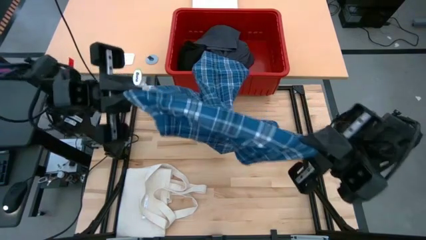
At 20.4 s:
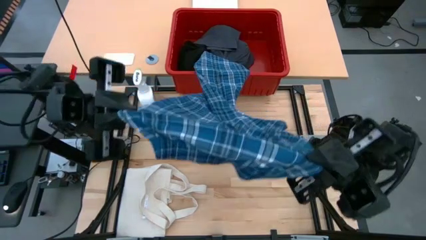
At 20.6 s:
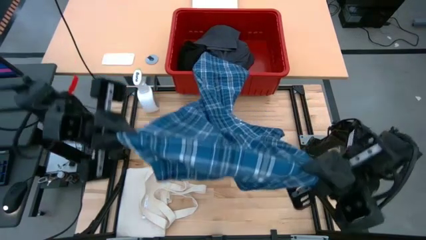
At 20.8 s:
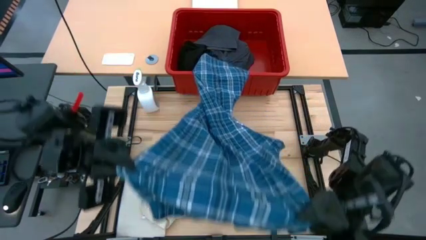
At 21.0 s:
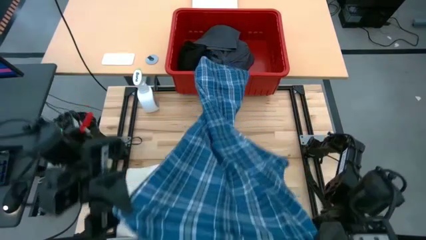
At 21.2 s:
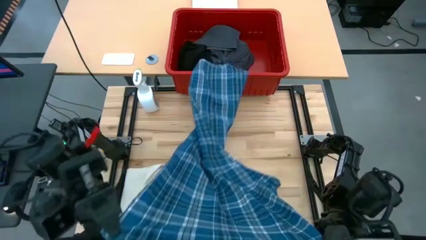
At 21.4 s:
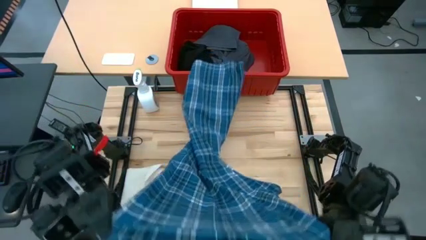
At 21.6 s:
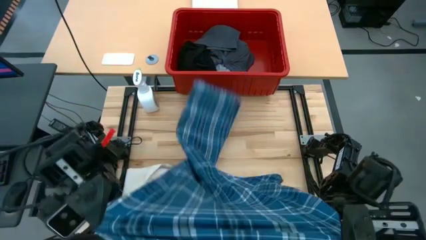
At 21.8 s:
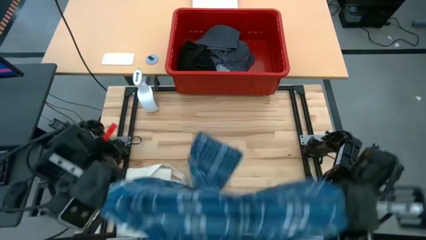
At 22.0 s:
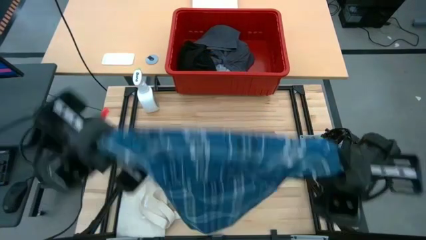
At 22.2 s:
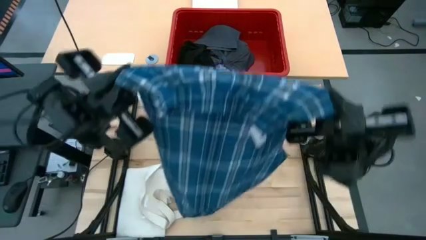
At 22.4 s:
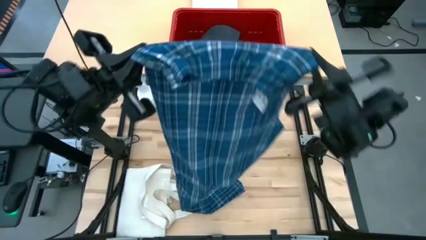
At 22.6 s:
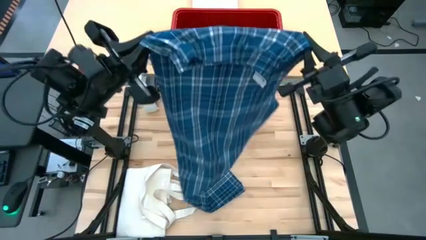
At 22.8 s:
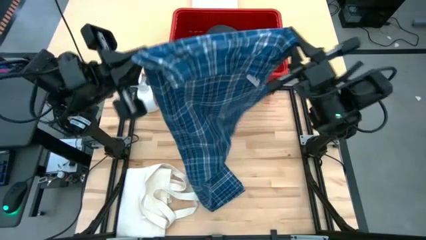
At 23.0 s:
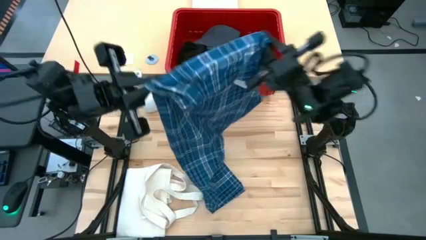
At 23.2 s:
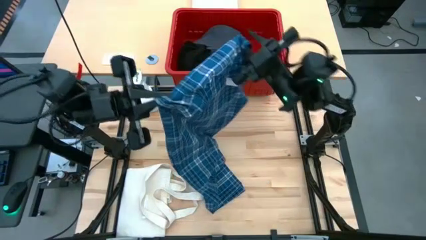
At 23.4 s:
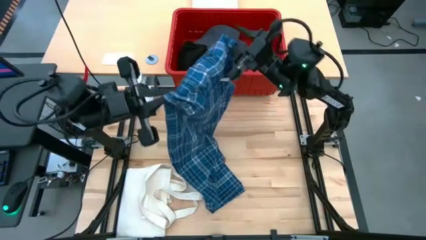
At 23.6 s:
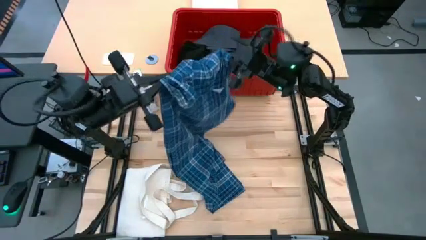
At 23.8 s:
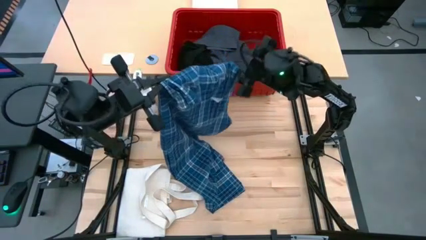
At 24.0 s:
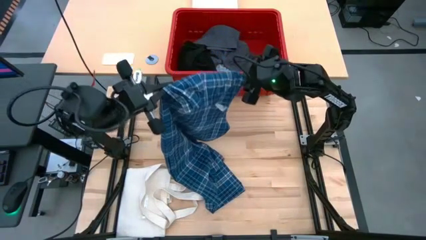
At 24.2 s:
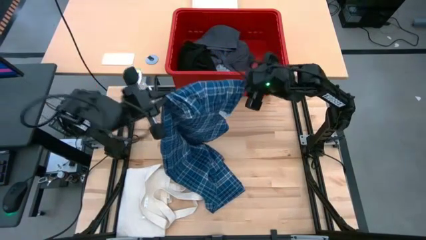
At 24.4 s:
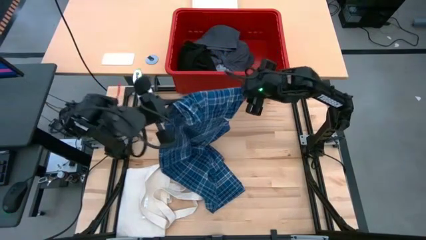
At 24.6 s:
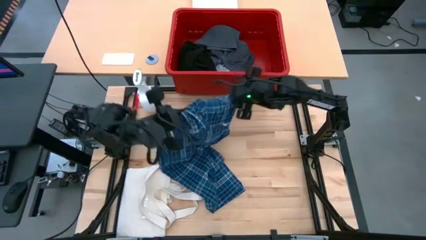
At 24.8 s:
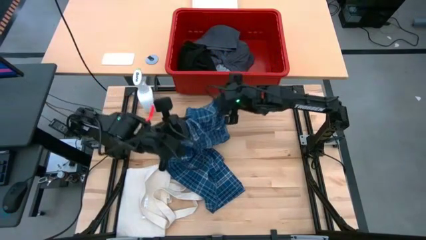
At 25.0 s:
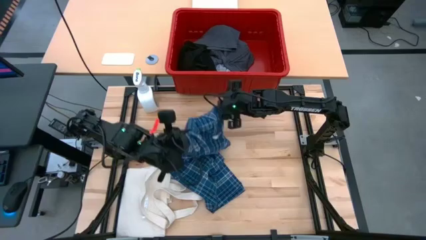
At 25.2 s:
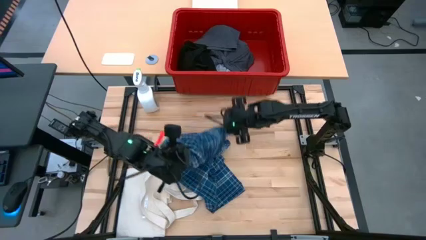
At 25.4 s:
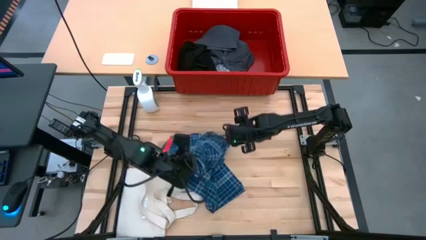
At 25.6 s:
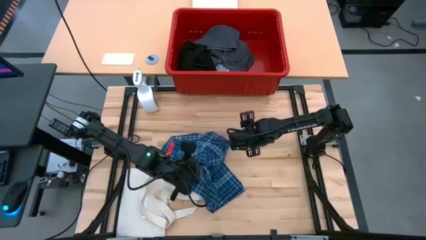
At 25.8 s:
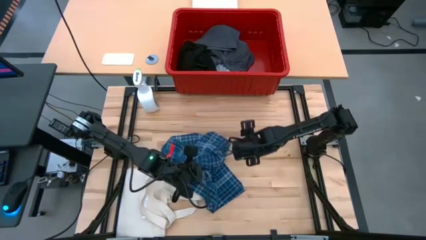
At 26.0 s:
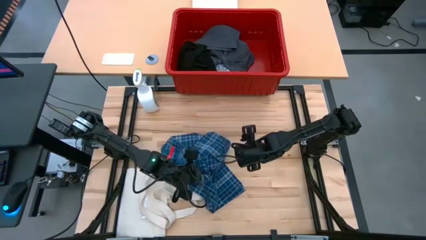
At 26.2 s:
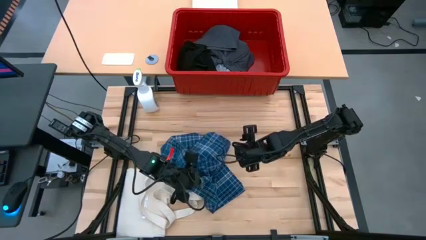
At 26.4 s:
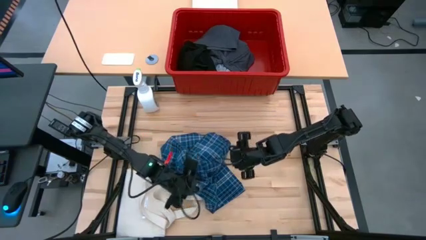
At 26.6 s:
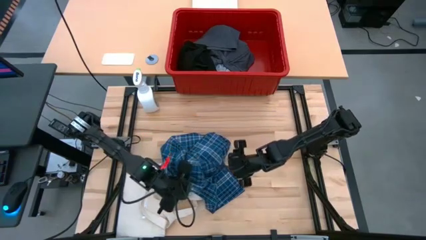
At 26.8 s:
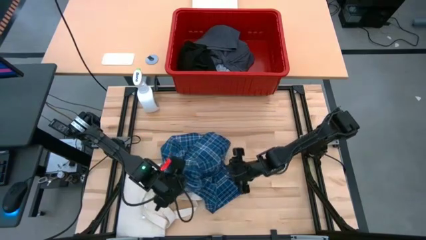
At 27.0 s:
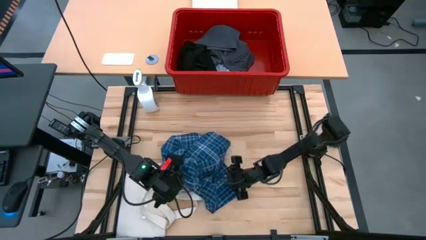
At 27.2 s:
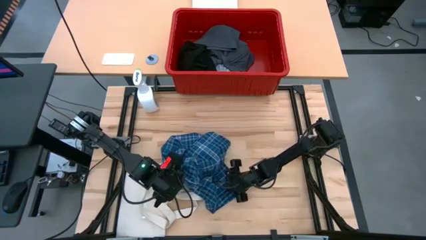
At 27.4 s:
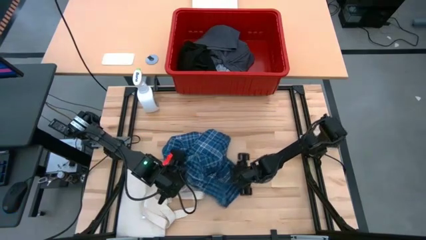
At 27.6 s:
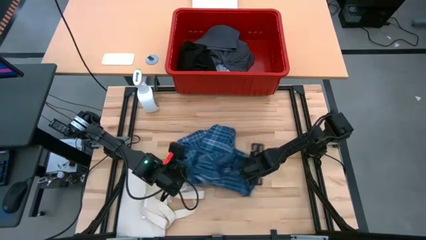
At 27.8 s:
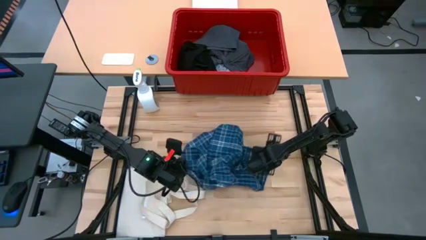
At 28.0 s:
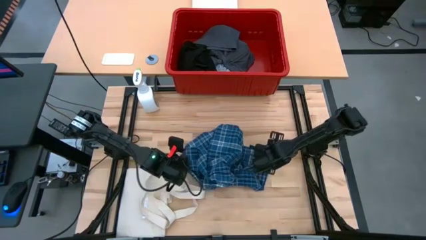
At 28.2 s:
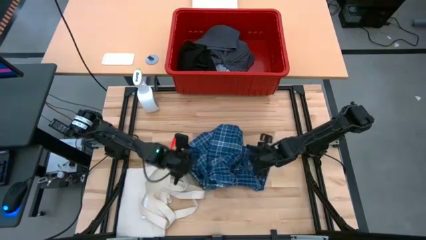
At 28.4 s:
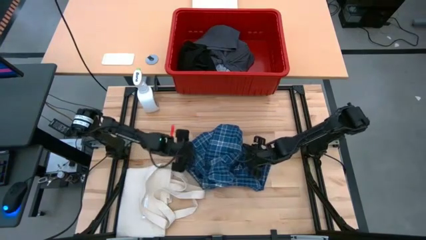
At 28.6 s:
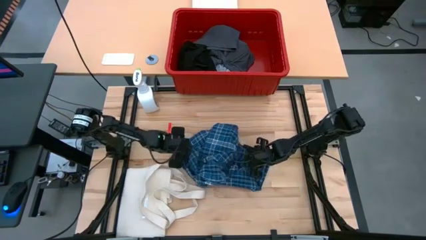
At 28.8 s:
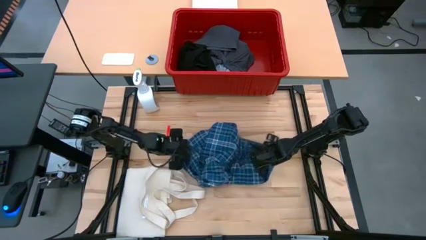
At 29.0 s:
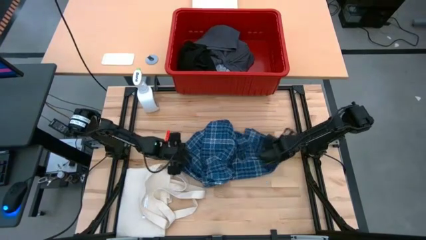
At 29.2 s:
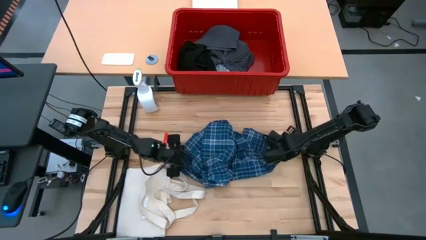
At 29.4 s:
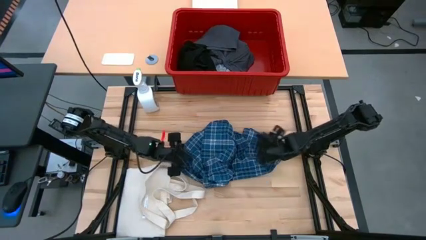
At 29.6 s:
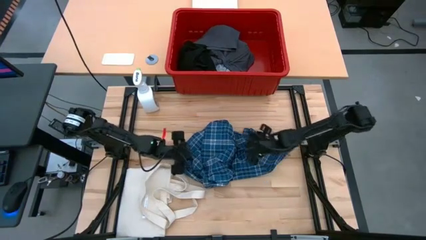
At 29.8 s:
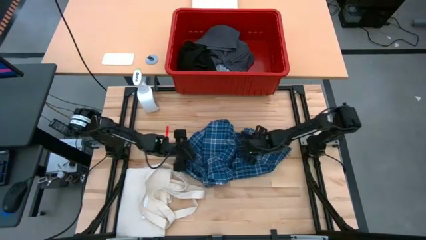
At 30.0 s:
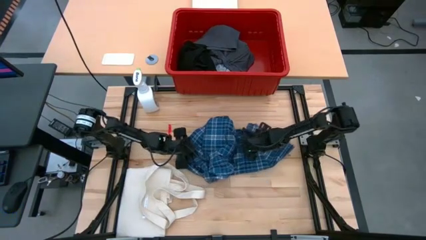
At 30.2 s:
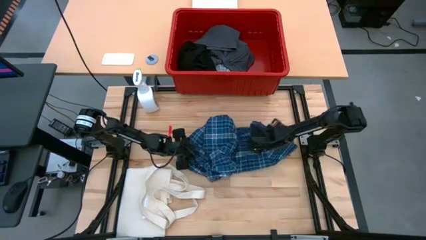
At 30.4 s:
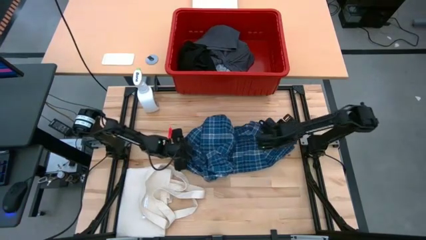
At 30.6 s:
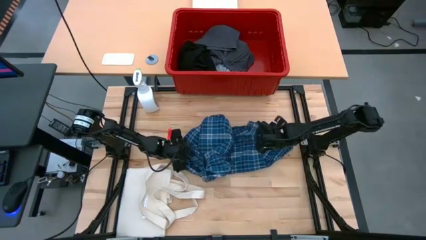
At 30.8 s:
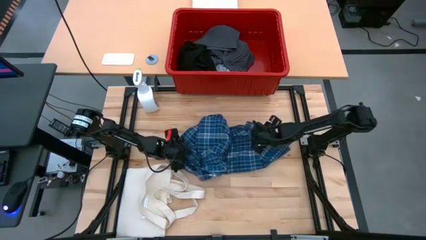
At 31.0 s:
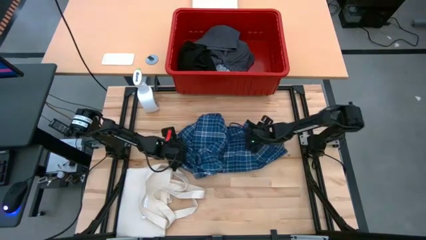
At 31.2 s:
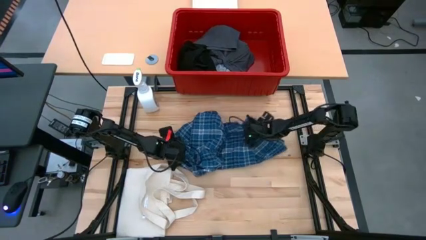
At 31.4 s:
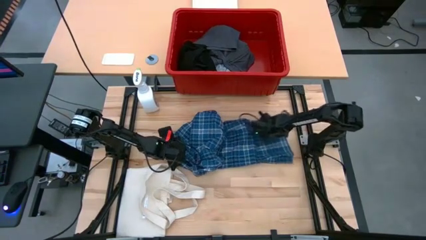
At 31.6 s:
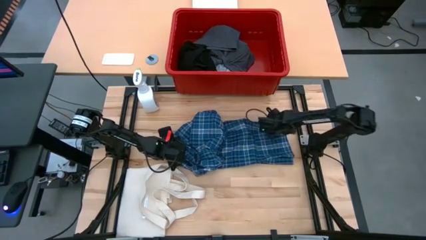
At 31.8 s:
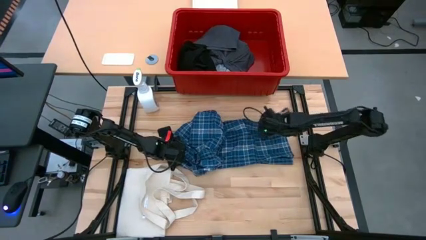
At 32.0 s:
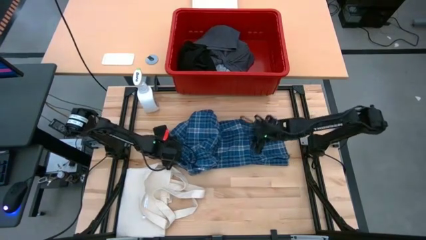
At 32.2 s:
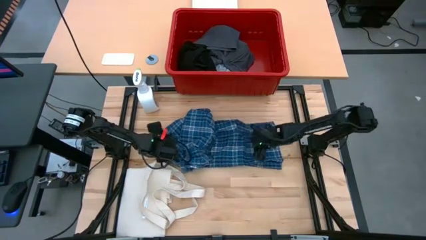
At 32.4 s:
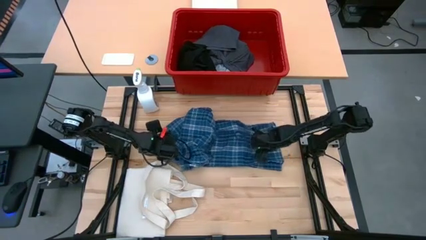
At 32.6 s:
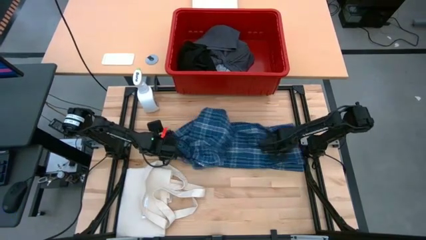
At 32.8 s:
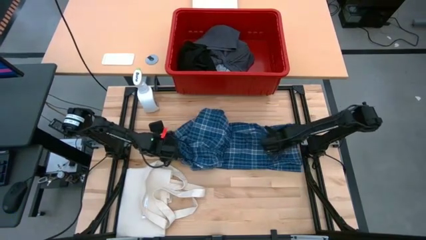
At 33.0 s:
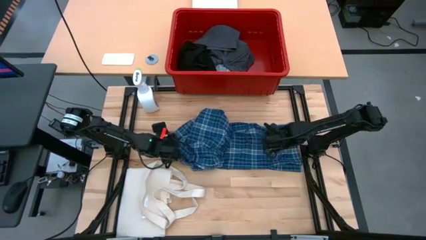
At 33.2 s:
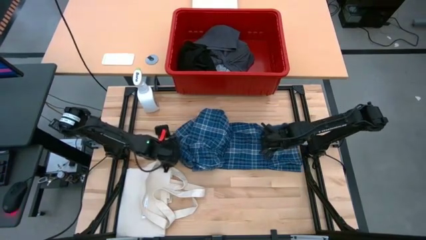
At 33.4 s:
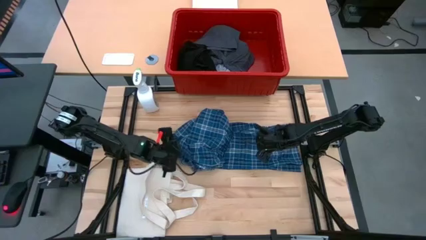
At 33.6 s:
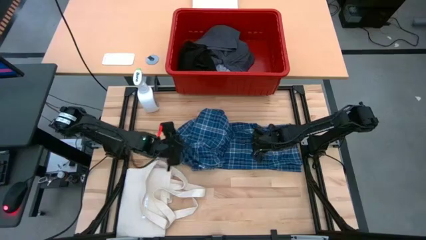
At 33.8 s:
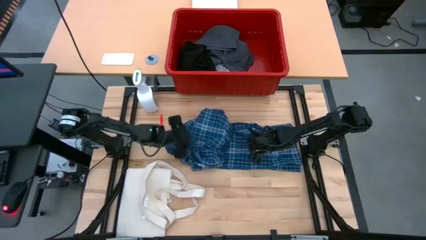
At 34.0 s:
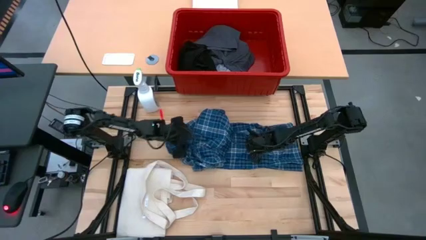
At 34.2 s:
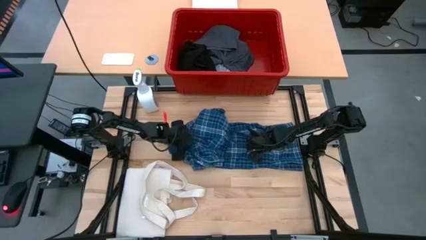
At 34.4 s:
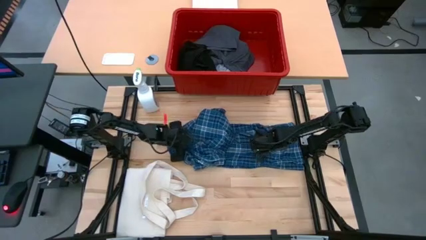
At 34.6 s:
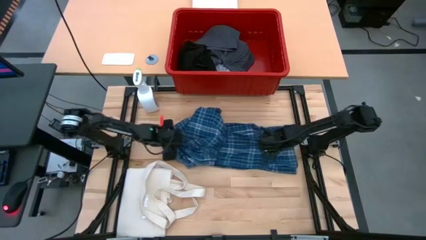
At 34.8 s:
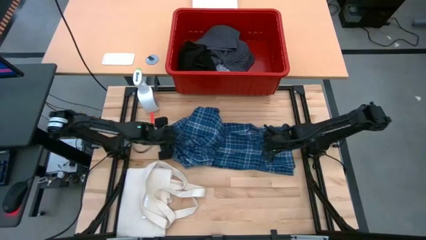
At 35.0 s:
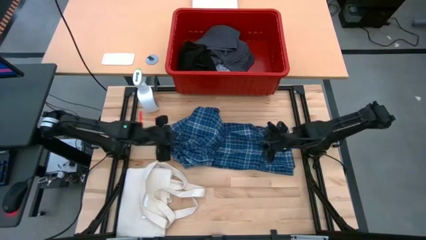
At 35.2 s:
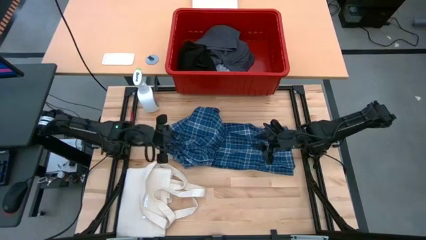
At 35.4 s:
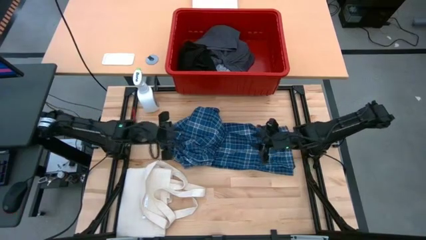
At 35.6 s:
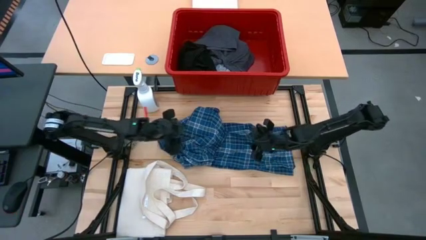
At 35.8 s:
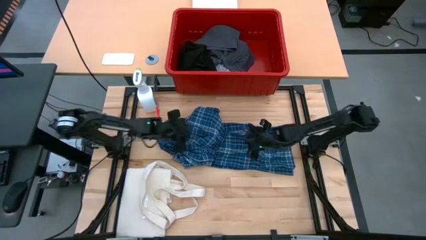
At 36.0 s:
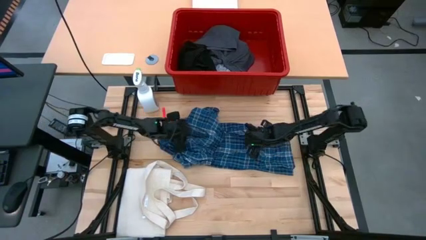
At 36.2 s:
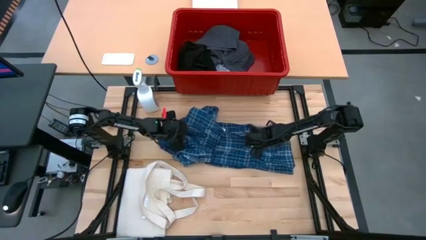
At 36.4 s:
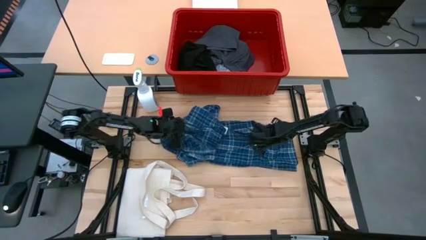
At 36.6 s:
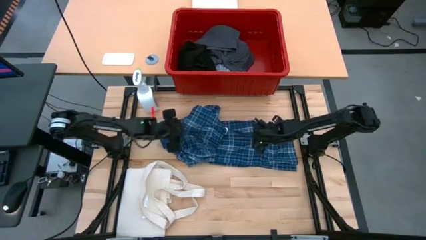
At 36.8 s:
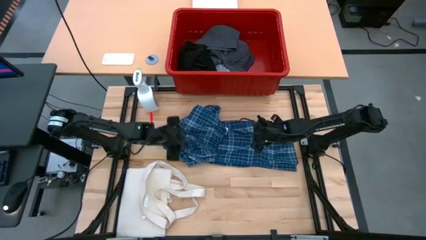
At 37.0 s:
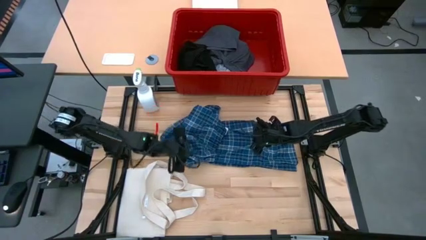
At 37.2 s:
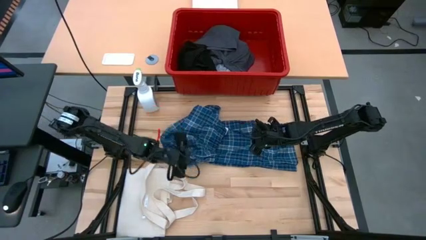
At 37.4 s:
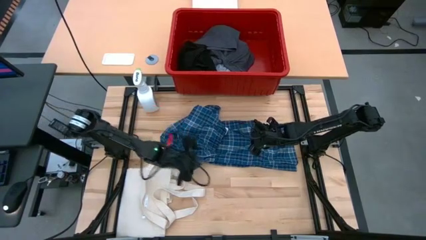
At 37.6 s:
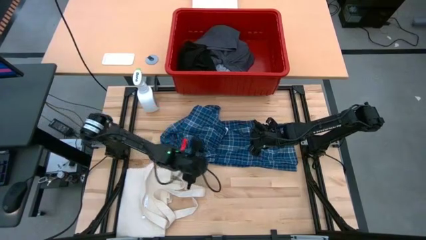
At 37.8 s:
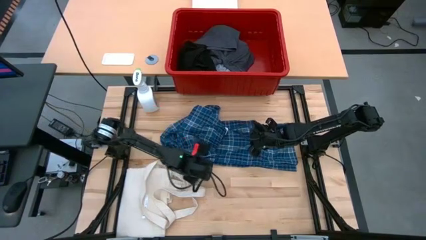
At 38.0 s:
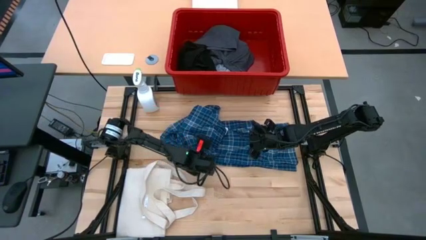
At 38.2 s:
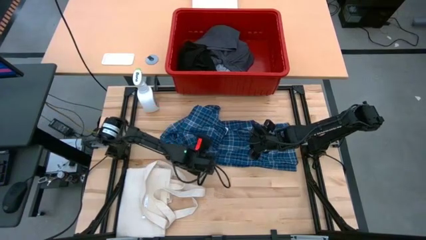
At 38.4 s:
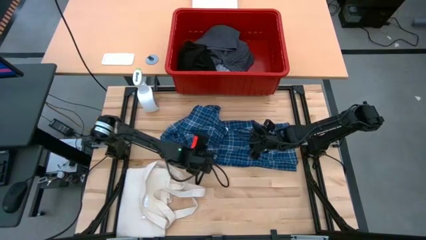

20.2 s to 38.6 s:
Task: Fold Laundry from Bin
Fold the blue pants
